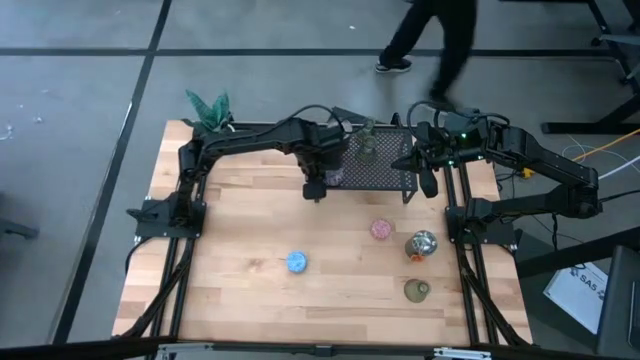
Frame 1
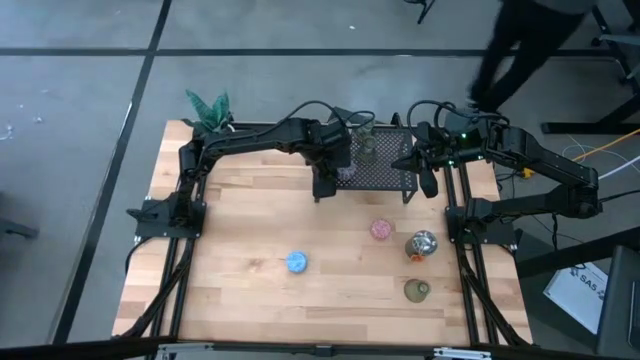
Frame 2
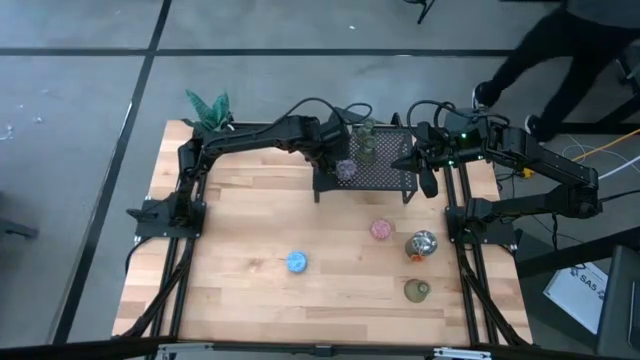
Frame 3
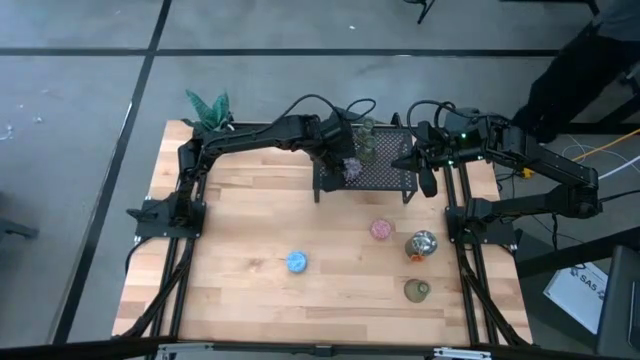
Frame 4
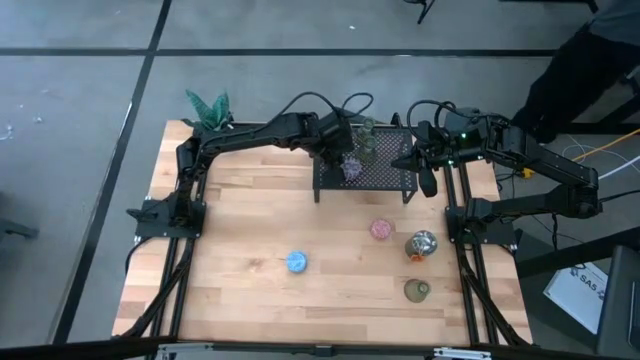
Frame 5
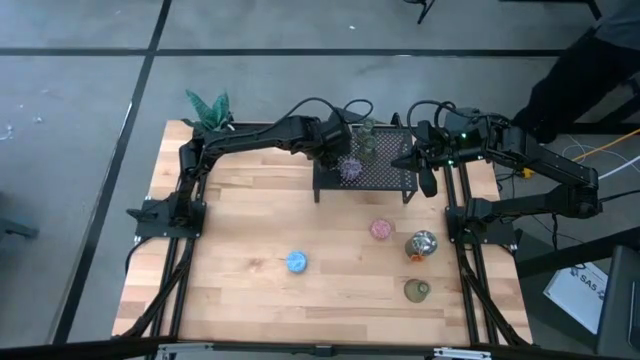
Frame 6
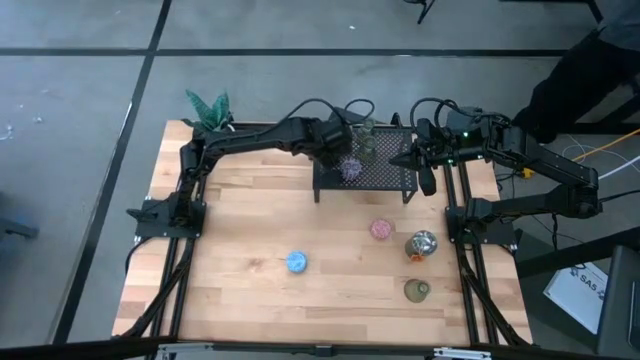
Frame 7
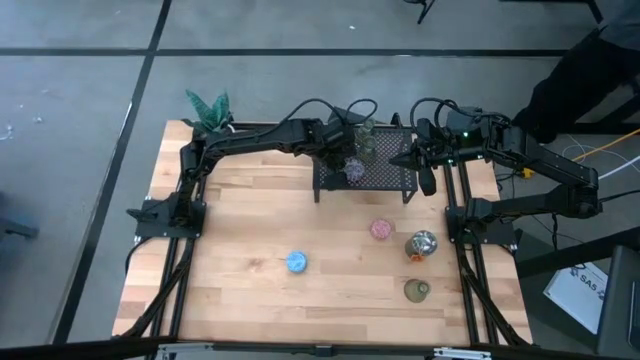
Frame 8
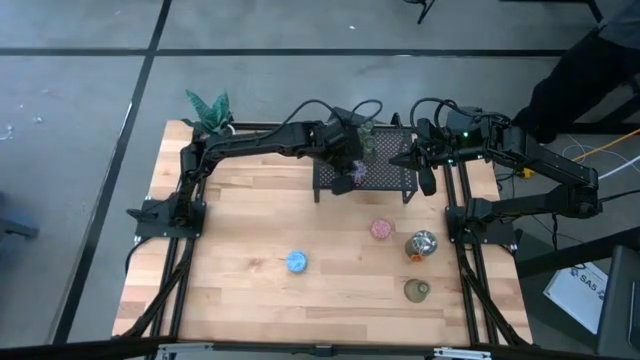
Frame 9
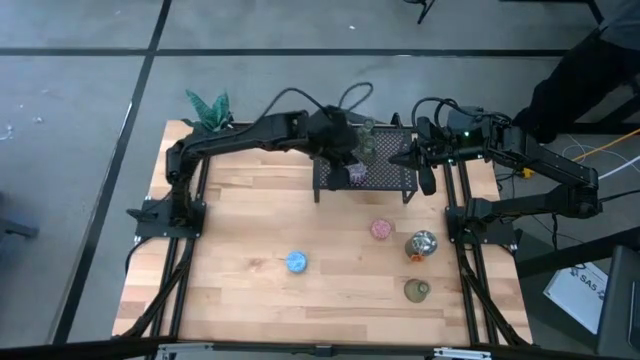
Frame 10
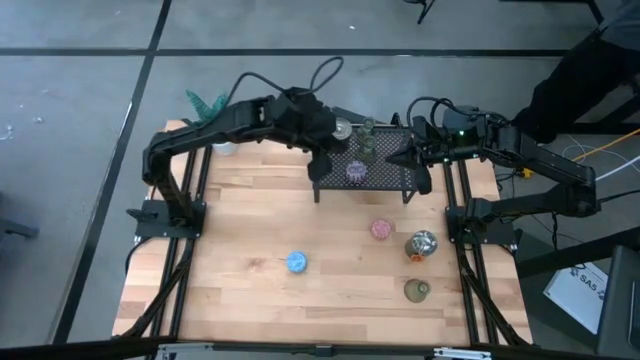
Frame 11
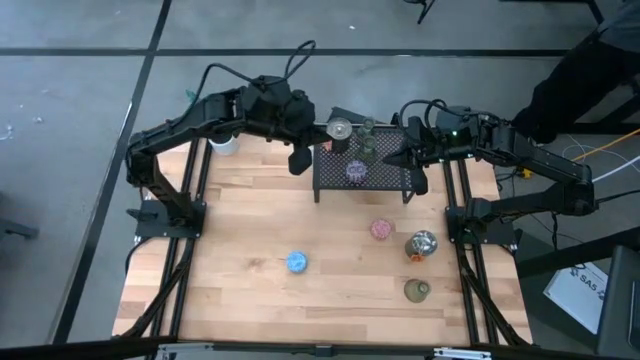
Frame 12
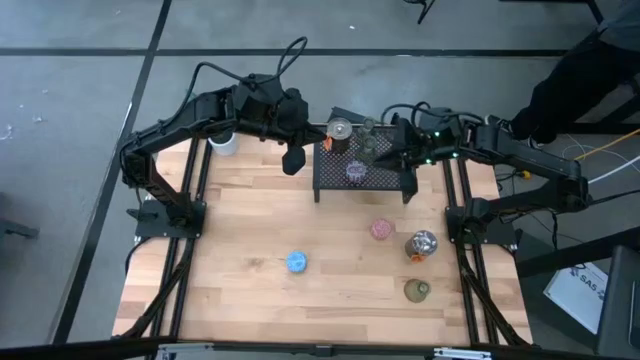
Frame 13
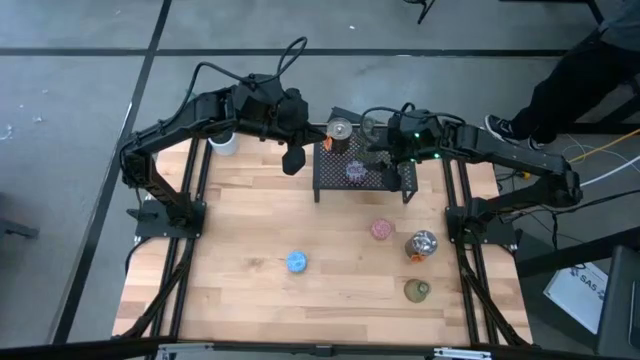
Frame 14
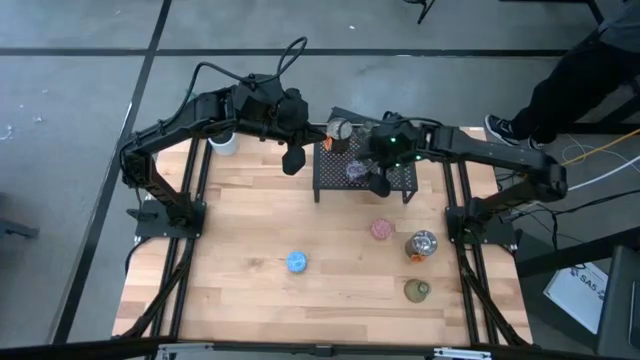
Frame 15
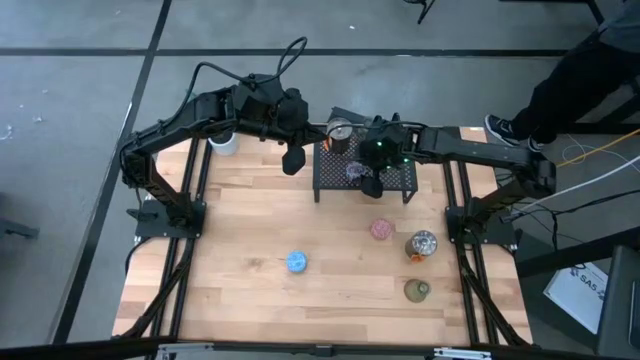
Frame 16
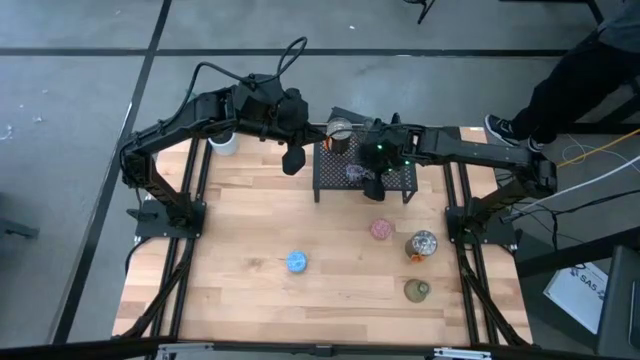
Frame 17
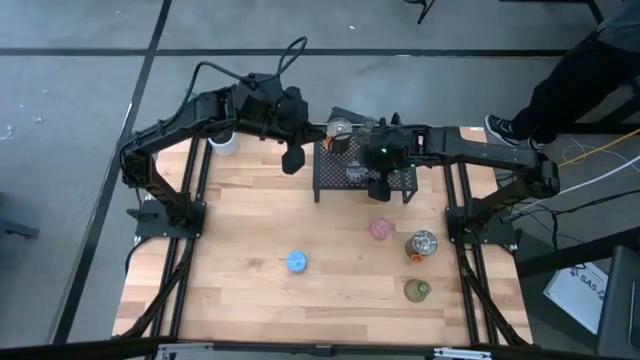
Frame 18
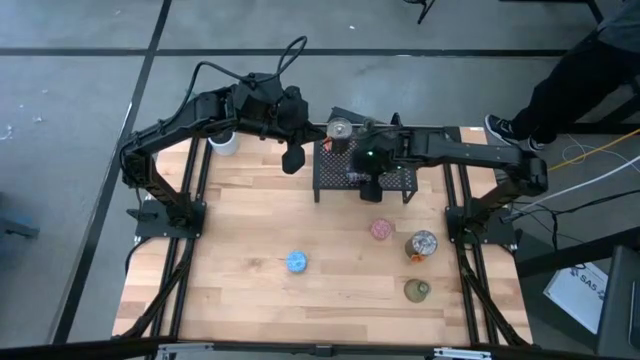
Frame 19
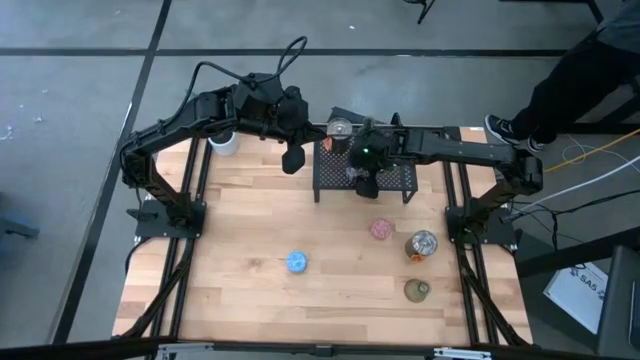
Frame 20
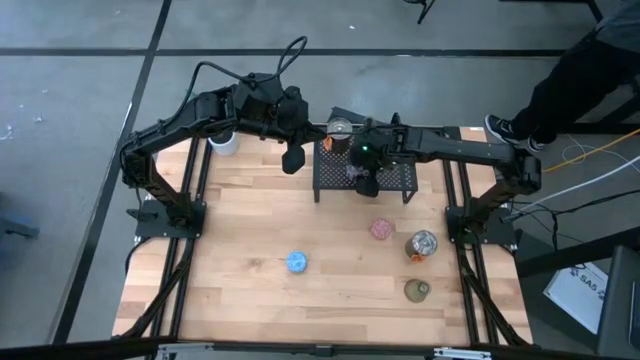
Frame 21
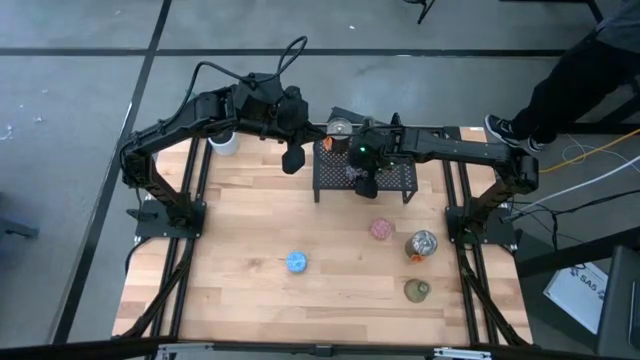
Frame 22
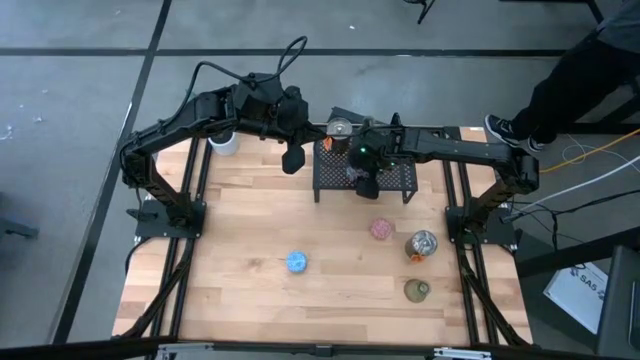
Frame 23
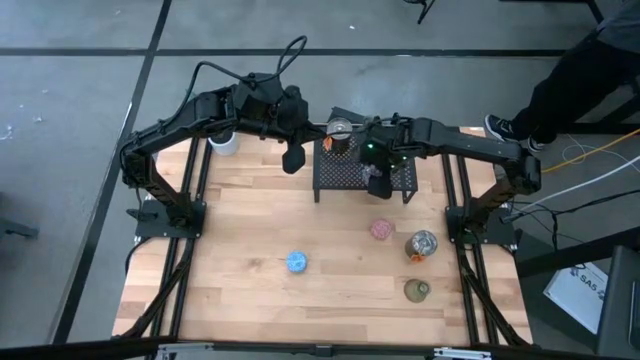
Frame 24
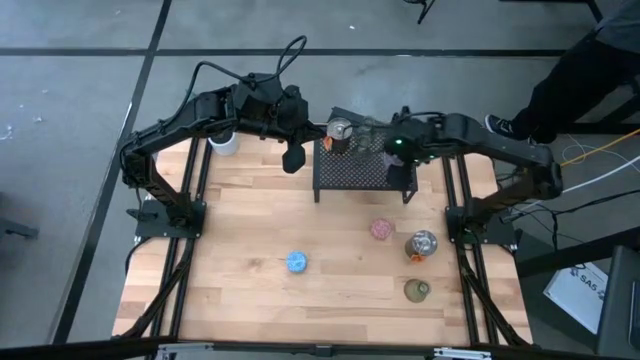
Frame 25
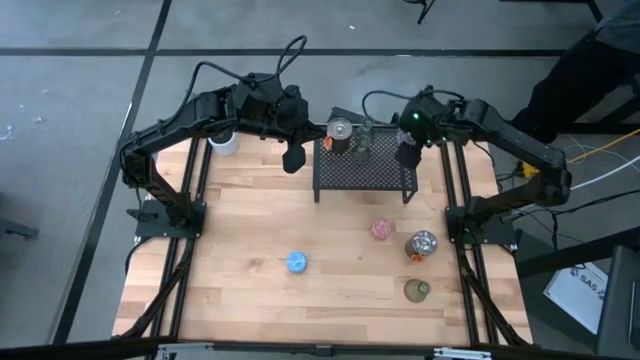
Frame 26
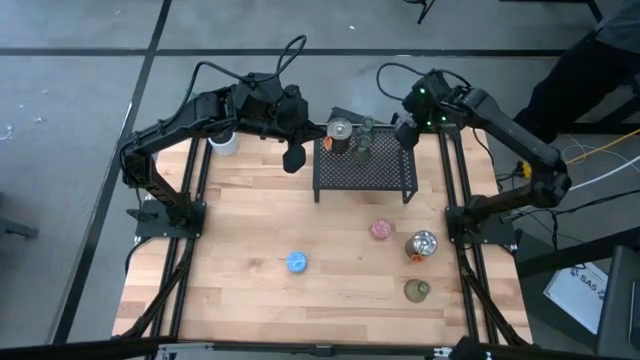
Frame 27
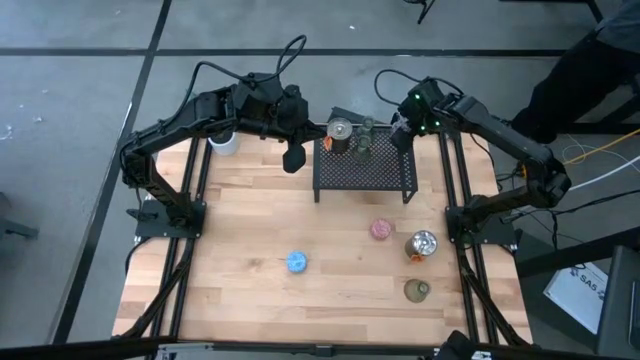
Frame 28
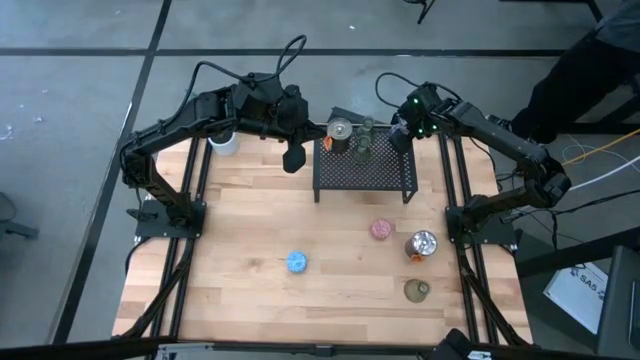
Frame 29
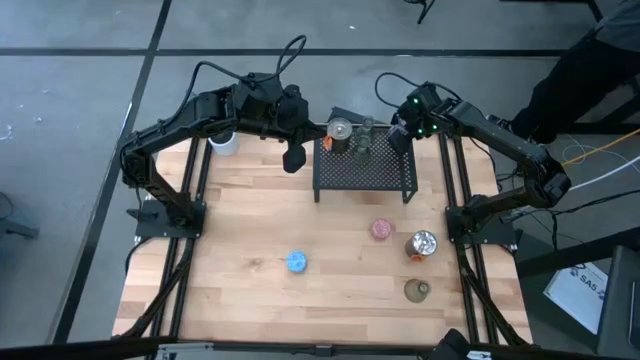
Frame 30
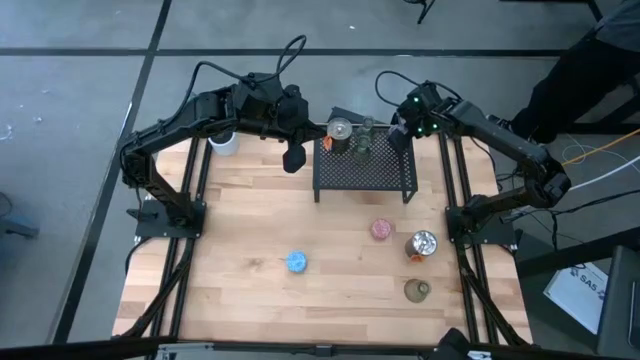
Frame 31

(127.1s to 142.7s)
Task: Pick & Place candle stick holders
Put the red scented candle on the shelf

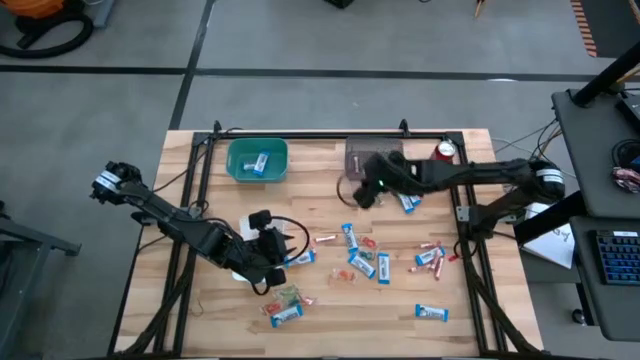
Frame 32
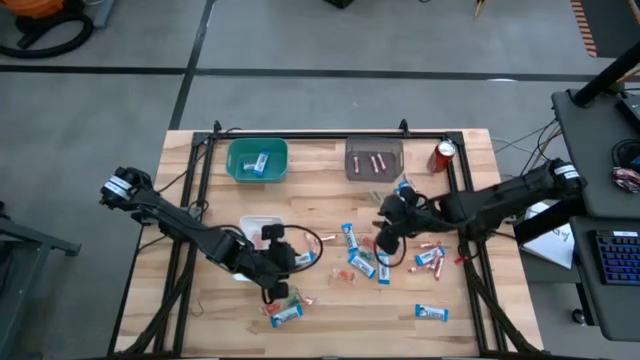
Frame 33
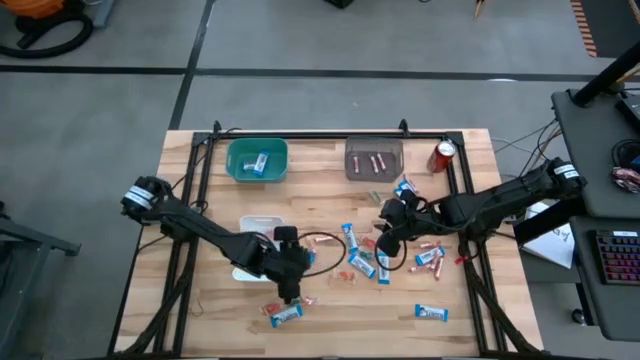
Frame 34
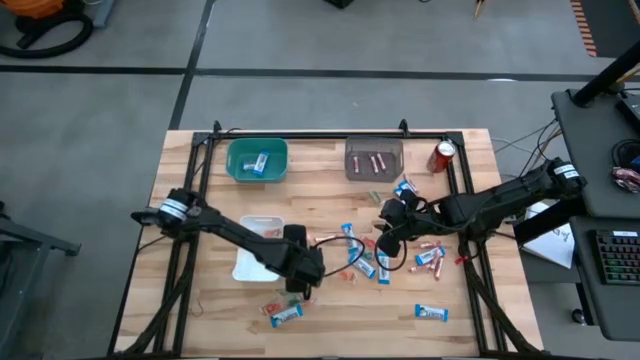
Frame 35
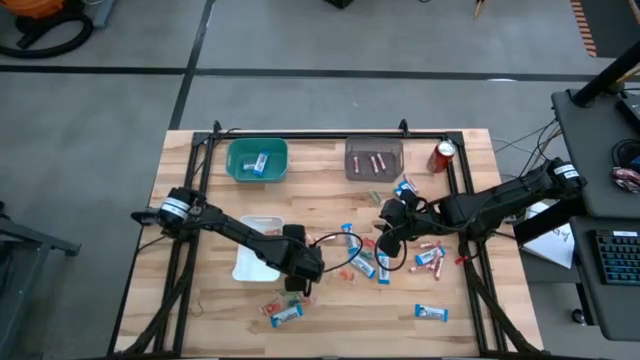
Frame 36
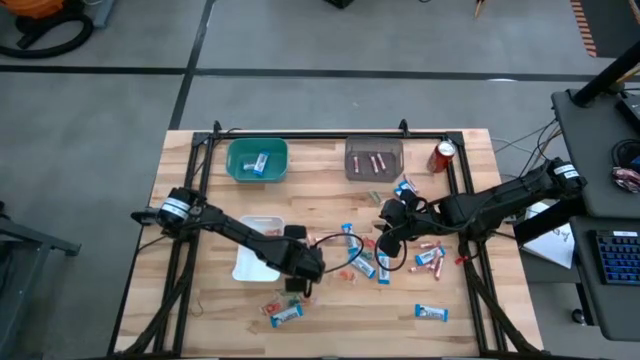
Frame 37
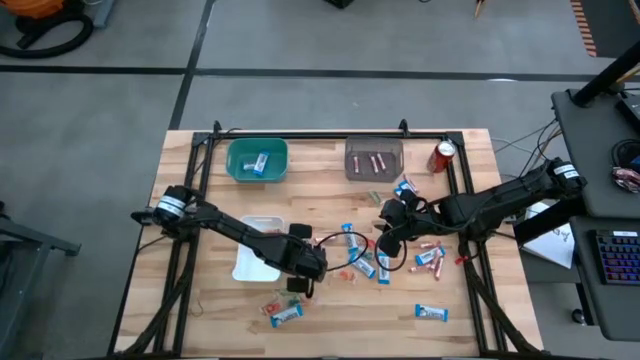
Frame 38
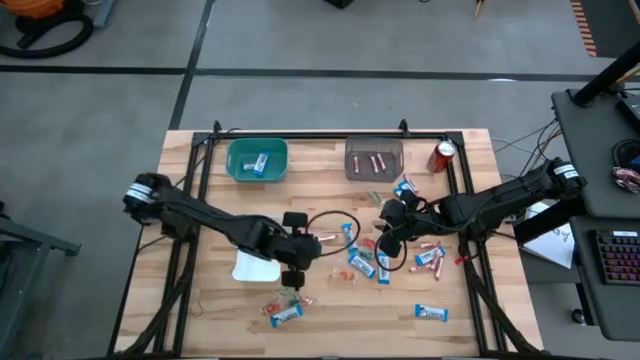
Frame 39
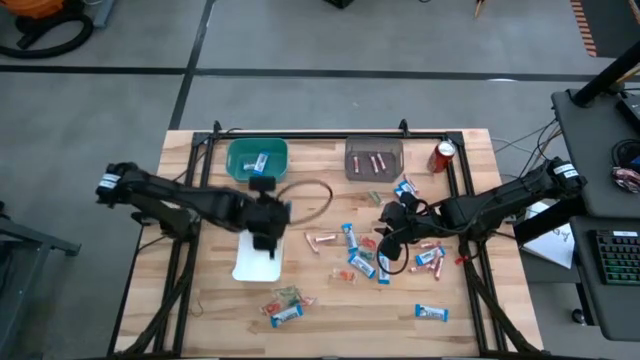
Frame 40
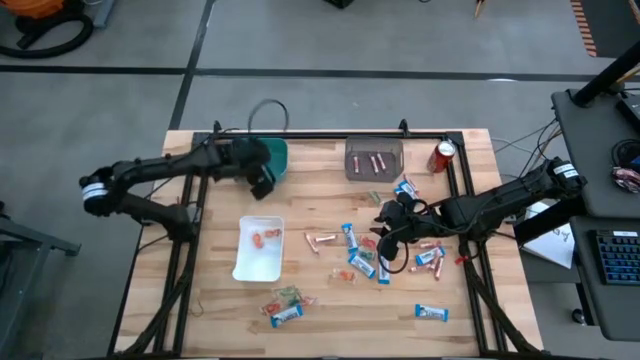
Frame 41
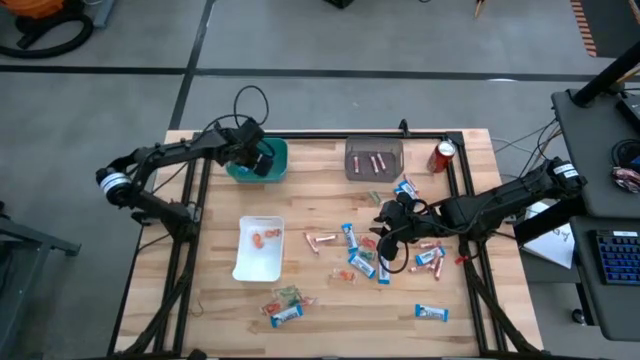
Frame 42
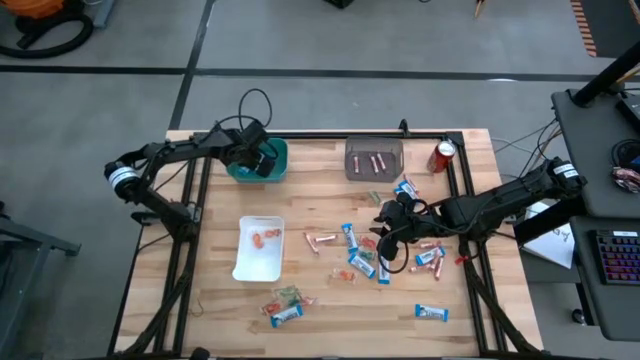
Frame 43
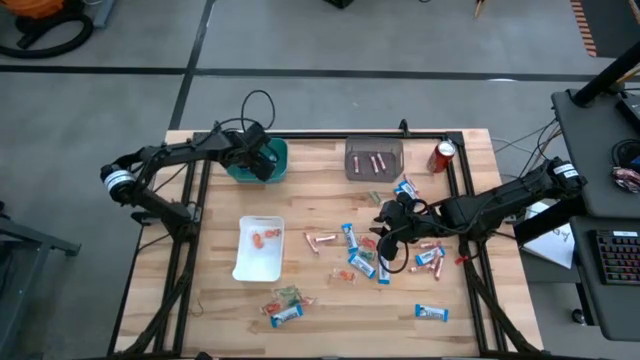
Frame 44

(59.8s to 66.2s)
Task: Sort candy
Put the white chocolate bar into the green bin
